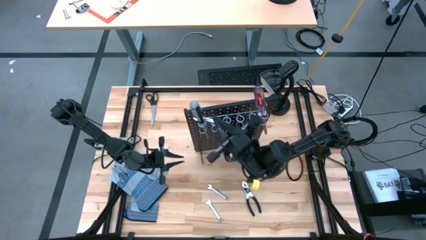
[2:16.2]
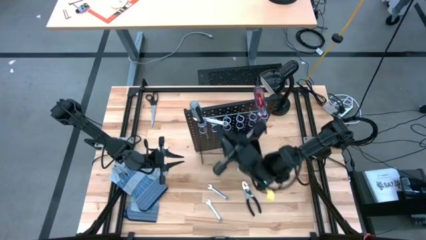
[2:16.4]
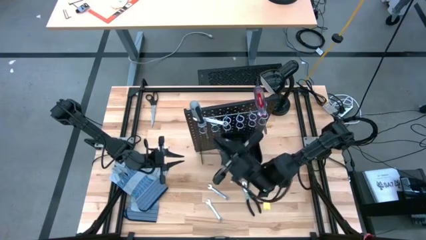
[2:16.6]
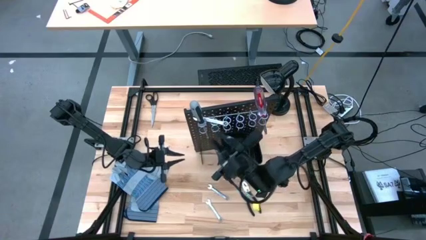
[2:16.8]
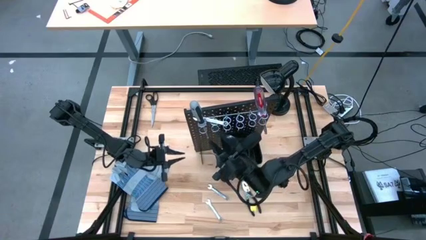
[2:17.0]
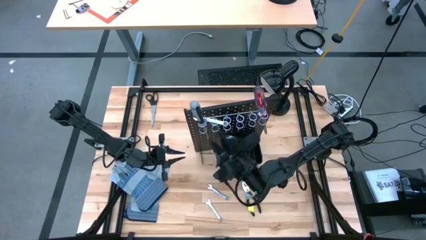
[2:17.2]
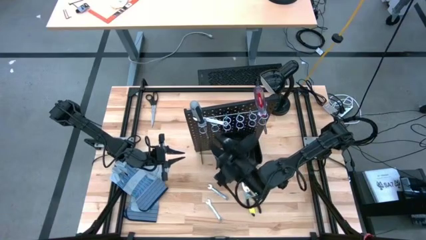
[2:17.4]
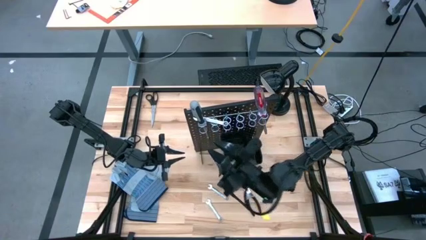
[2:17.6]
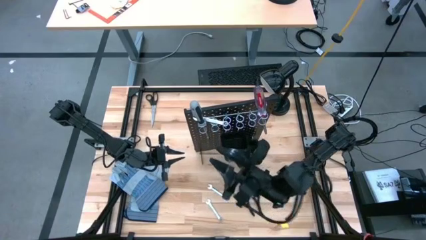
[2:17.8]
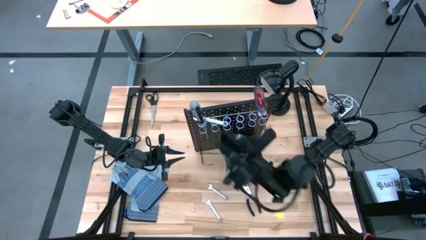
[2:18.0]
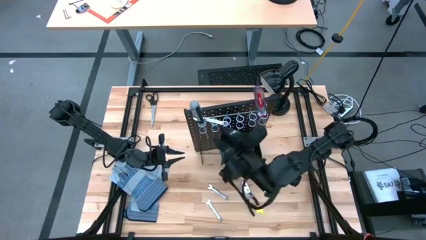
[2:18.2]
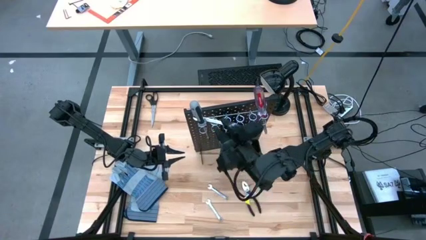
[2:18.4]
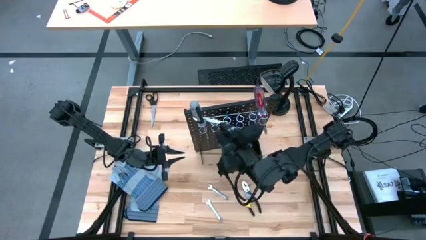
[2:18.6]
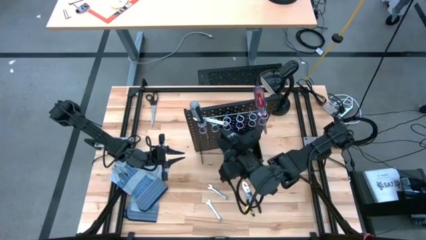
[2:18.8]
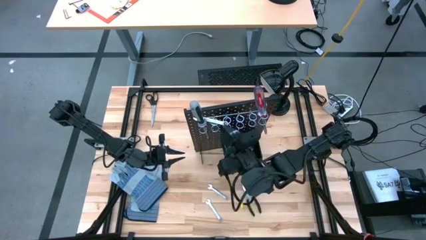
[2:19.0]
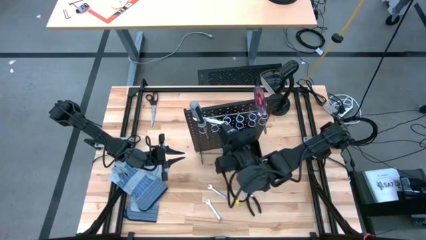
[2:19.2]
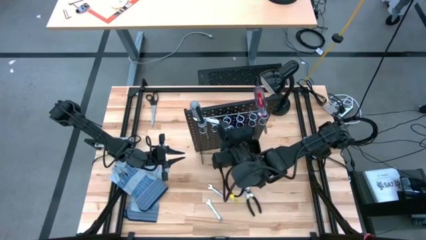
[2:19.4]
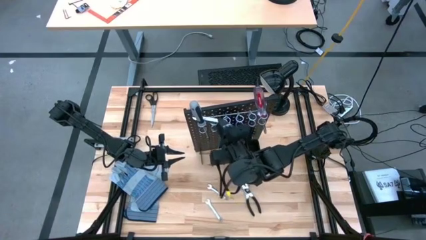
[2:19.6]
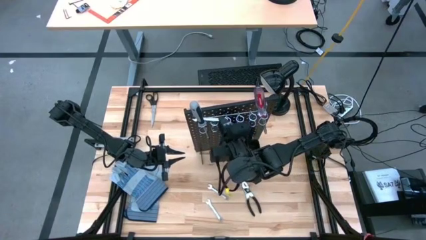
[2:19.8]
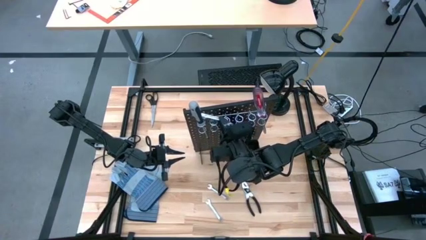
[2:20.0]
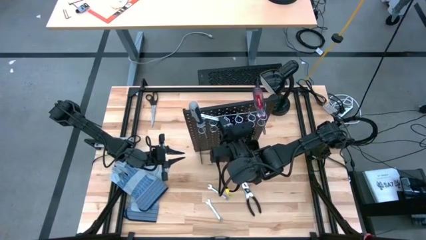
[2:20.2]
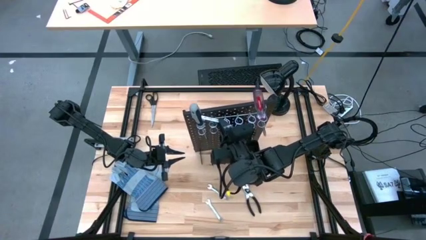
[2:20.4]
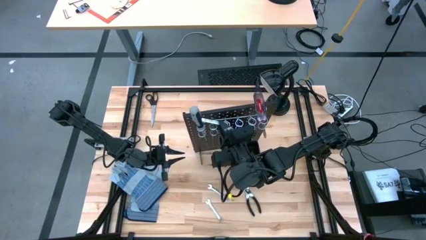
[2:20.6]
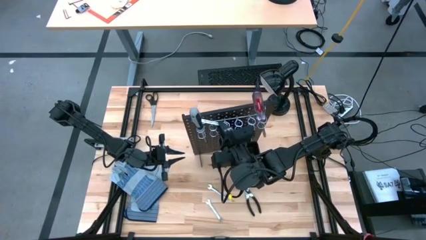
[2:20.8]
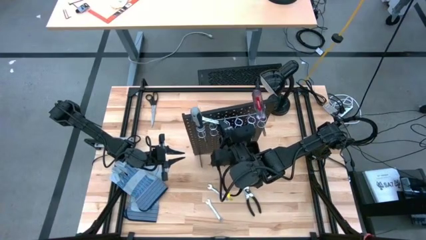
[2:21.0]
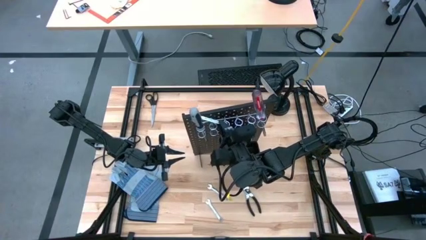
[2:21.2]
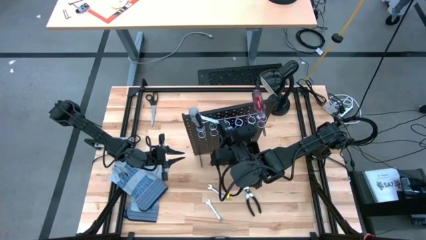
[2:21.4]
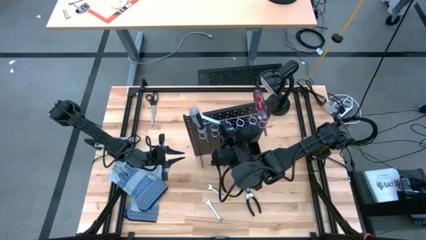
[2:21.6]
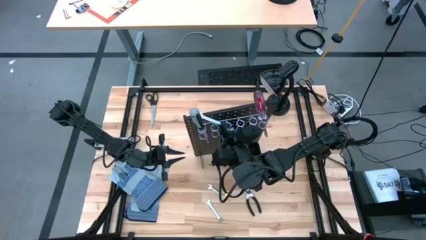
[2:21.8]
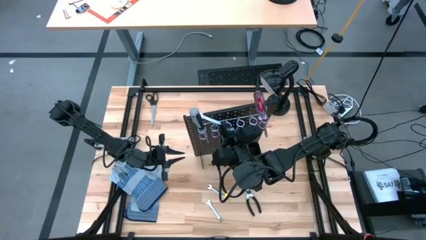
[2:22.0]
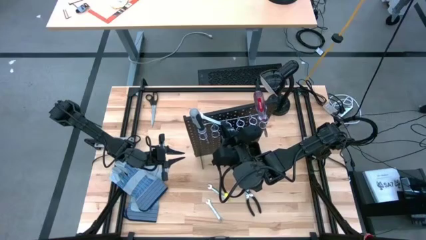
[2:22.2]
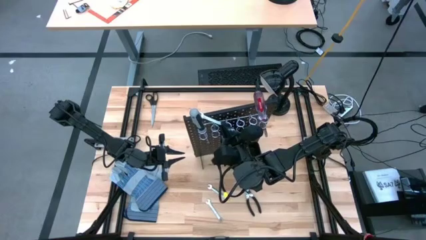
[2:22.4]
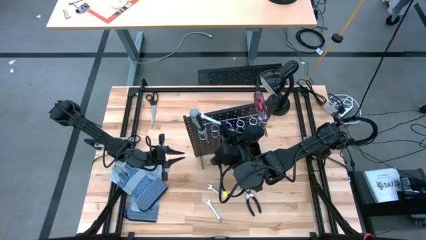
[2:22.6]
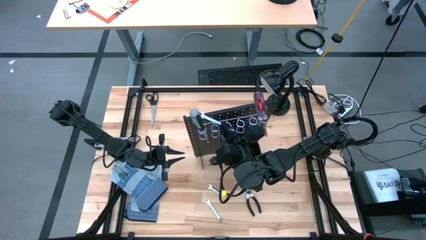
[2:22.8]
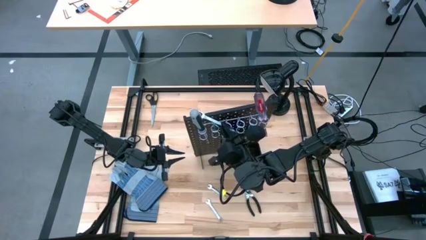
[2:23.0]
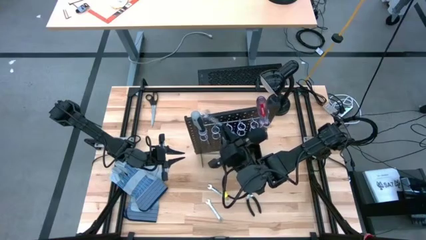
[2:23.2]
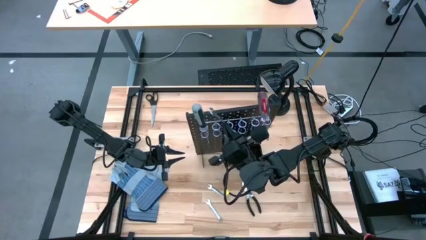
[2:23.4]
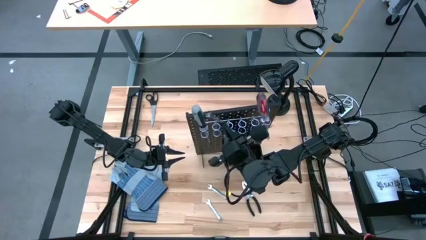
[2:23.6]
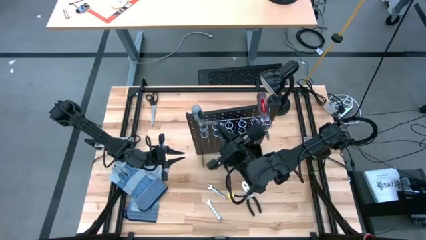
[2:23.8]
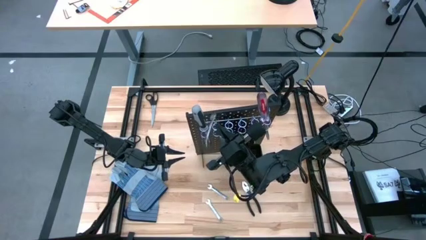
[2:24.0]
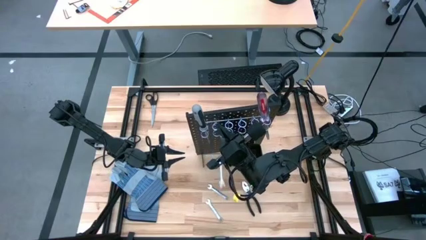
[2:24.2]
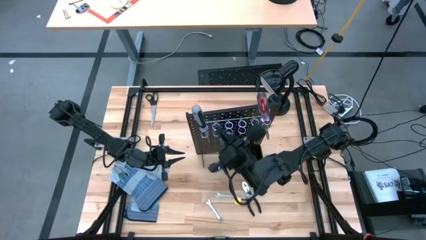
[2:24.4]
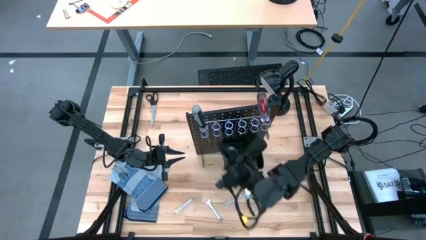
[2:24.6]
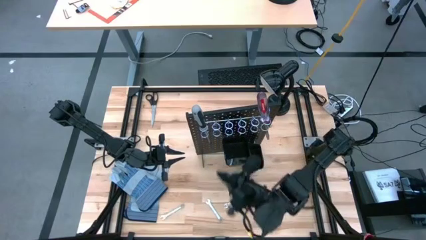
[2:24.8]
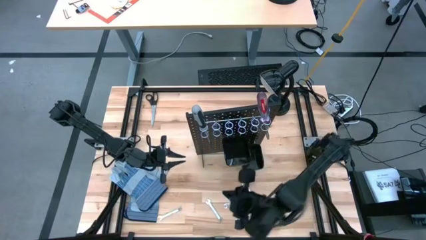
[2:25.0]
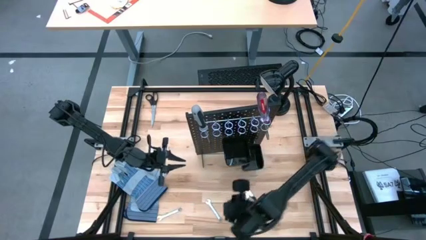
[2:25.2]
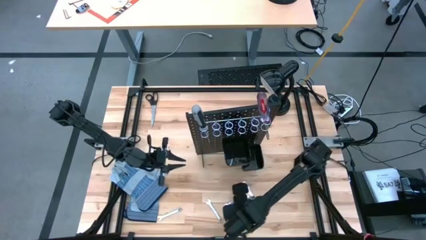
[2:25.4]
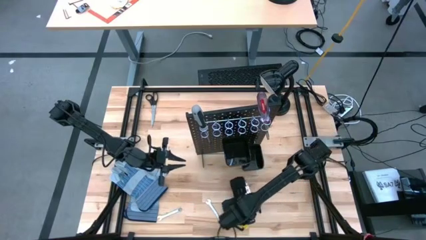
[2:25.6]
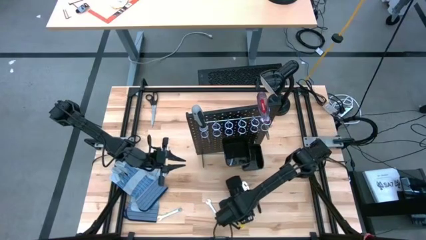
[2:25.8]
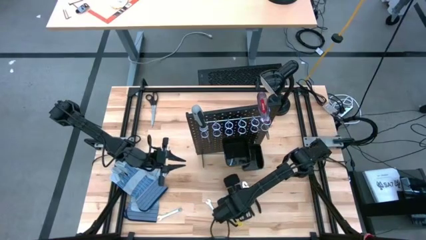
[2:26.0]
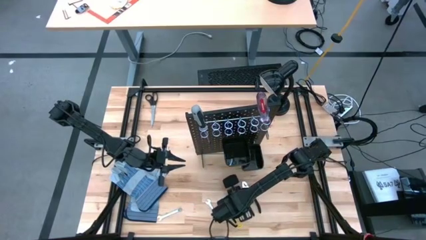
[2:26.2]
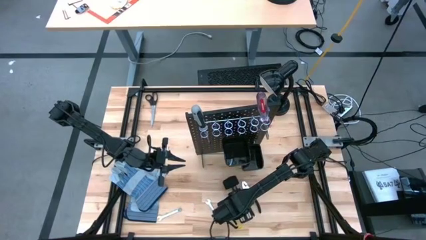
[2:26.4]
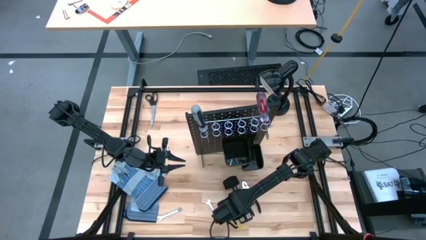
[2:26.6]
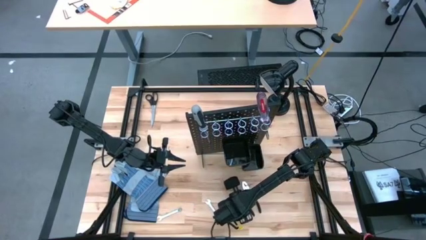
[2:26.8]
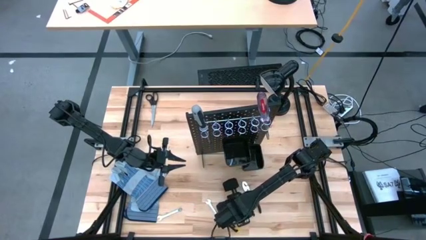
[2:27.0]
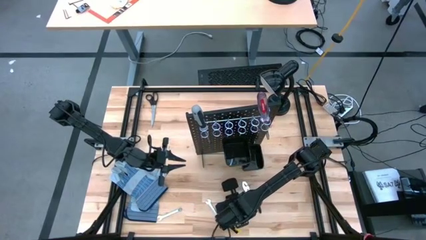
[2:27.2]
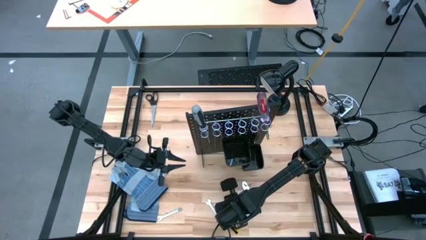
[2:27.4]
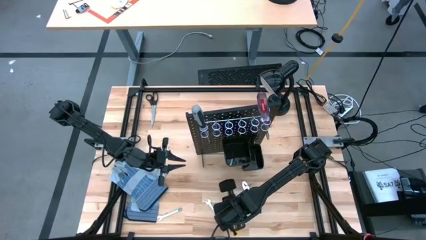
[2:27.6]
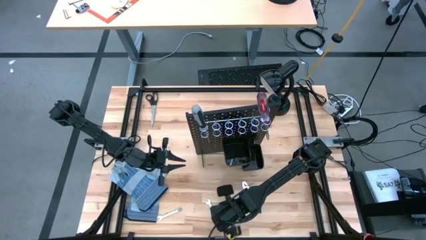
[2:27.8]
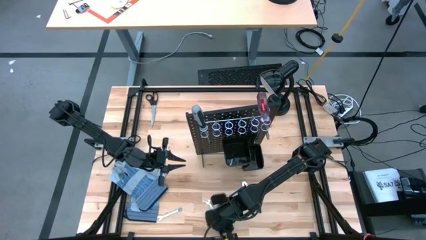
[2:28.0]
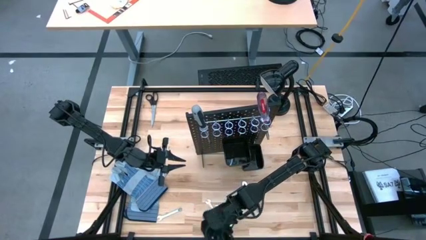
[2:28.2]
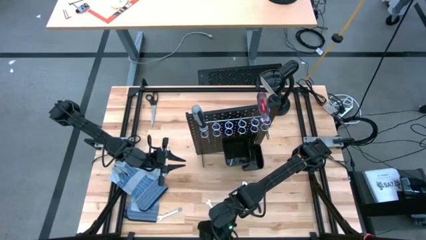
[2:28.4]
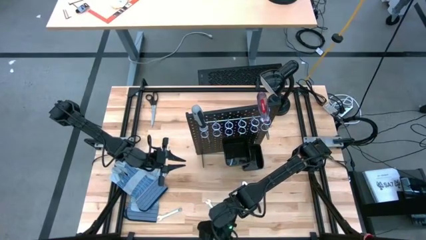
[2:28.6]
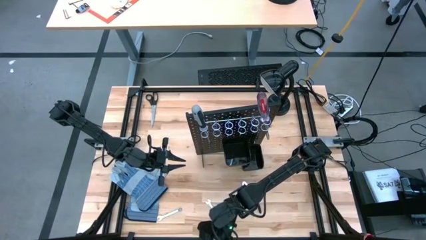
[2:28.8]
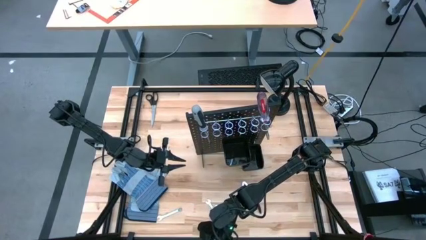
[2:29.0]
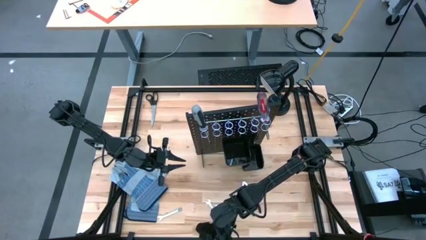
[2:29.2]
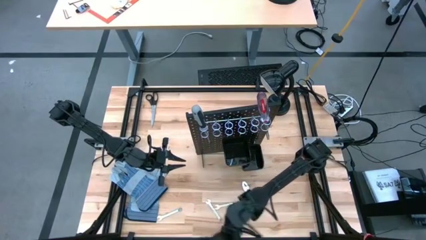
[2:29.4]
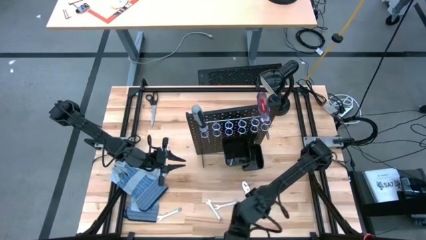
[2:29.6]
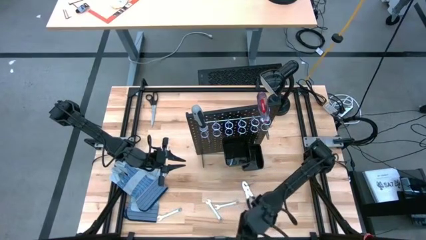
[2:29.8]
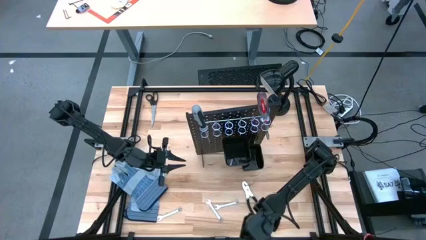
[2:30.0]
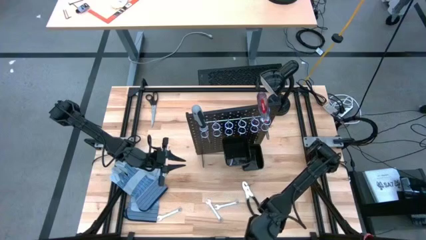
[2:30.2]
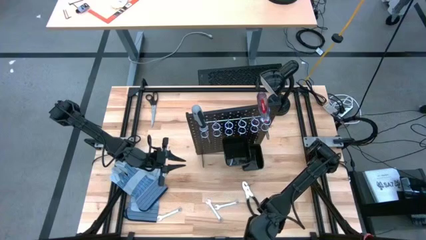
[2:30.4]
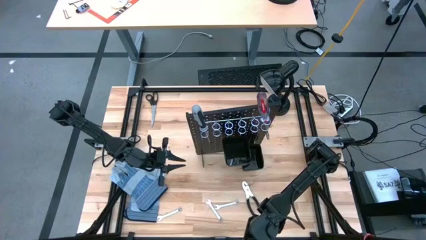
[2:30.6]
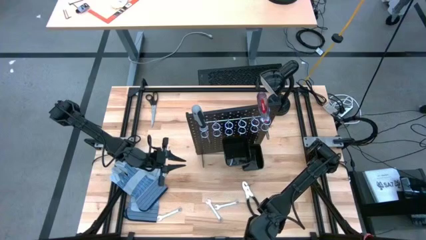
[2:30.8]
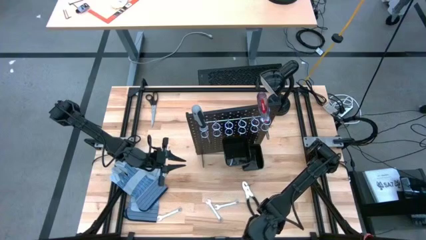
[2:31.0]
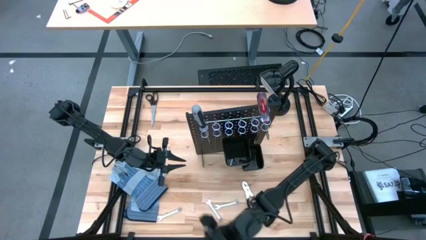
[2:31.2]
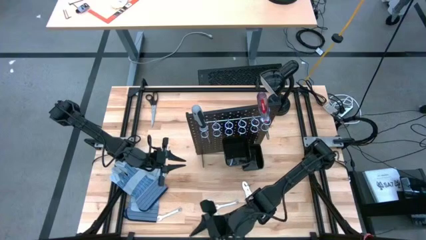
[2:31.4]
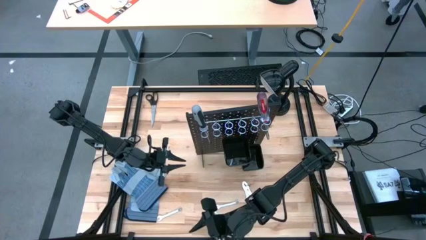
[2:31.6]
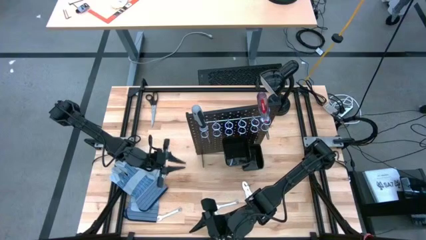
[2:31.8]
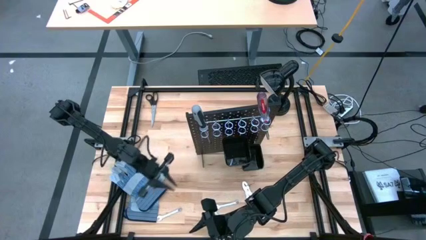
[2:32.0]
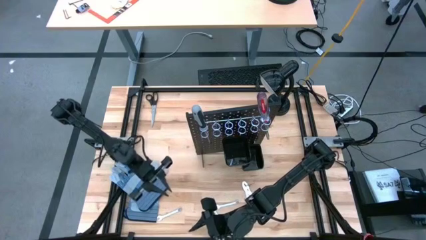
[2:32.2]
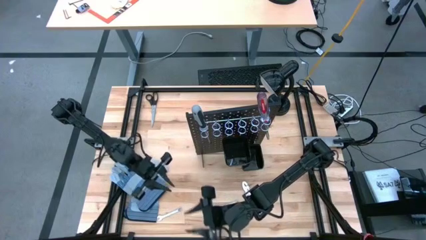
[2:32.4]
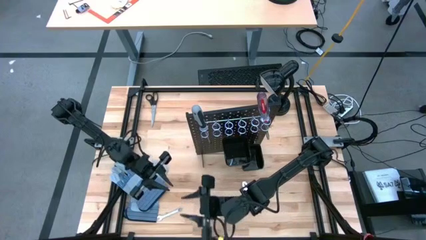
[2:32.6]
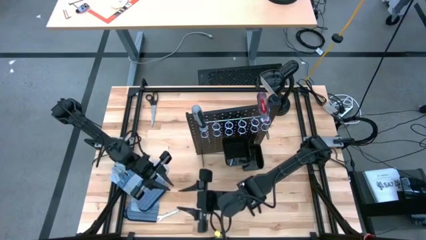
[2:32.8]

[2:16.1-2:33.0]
Task: Hang tools onto peg board
Hang the silver wrench on the black peg board
